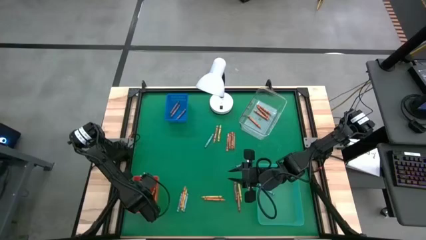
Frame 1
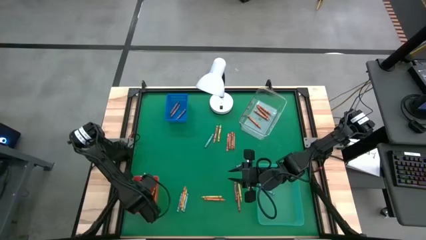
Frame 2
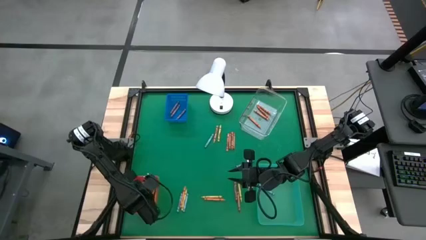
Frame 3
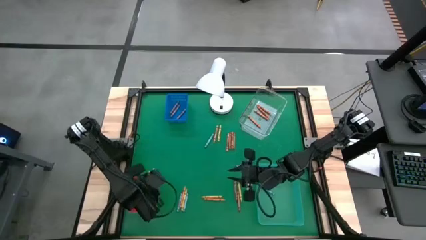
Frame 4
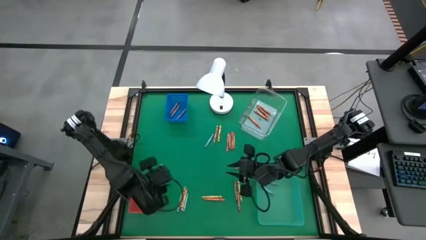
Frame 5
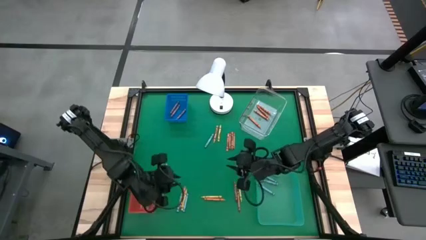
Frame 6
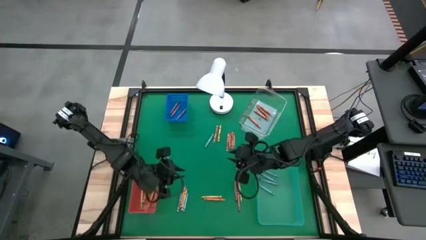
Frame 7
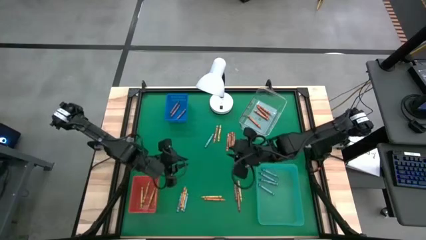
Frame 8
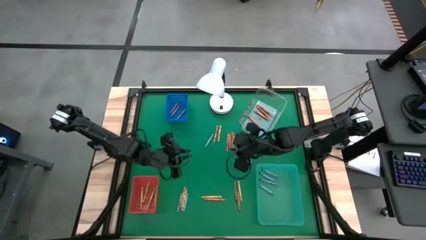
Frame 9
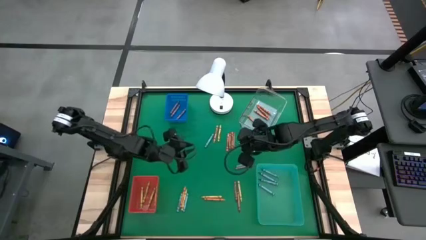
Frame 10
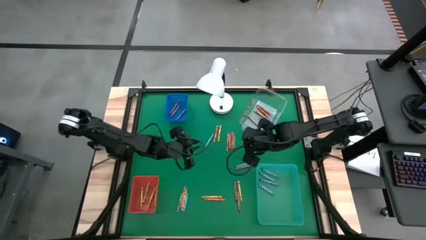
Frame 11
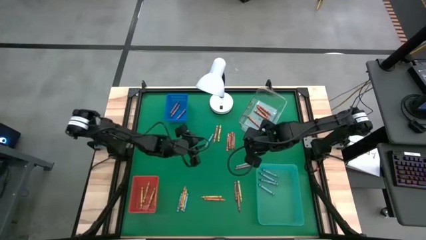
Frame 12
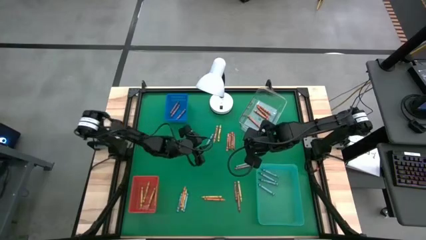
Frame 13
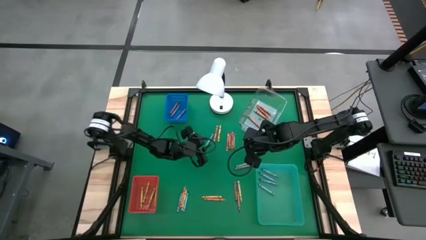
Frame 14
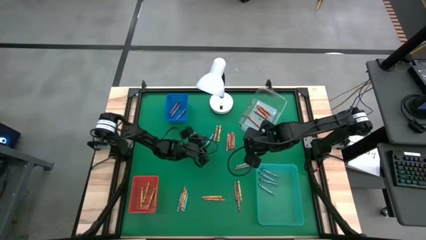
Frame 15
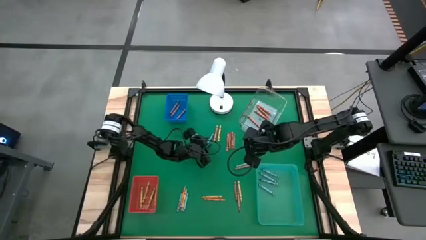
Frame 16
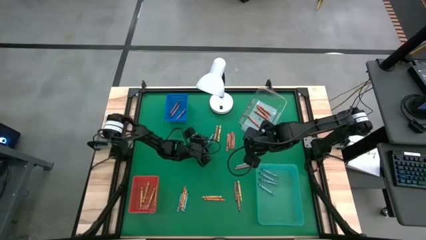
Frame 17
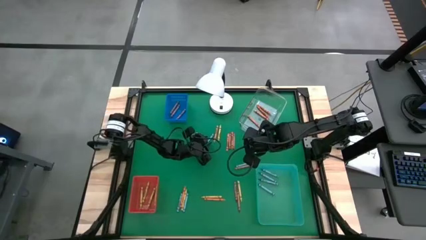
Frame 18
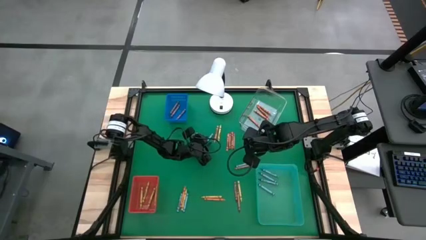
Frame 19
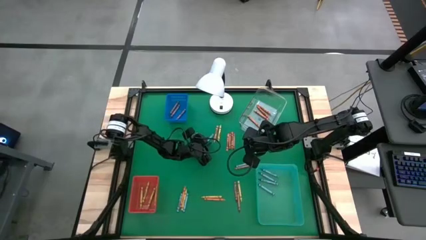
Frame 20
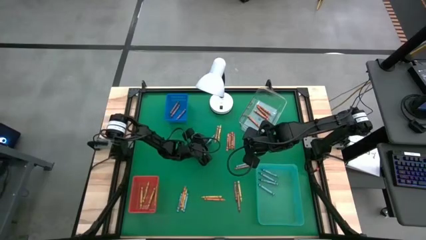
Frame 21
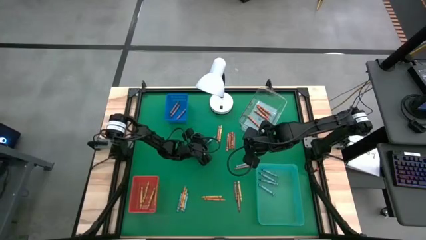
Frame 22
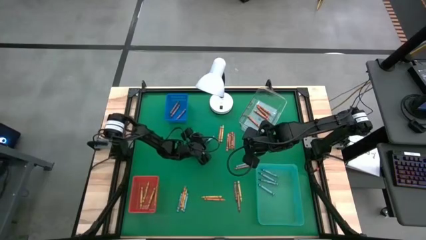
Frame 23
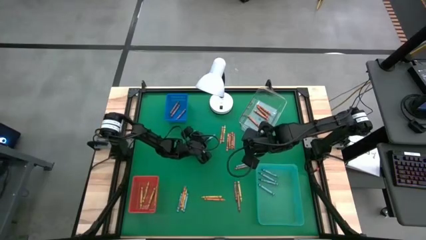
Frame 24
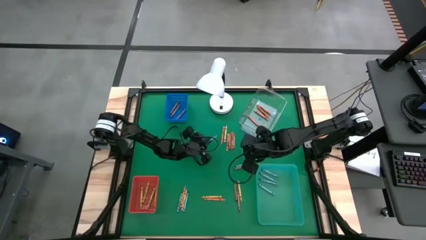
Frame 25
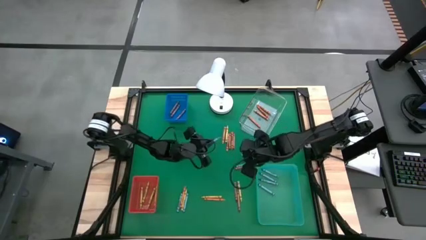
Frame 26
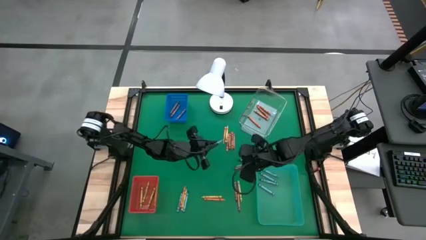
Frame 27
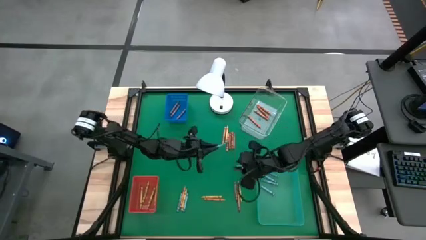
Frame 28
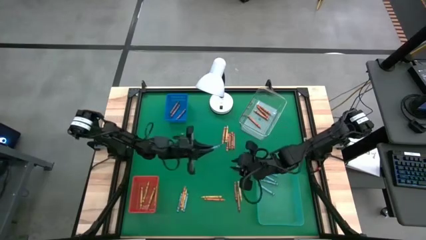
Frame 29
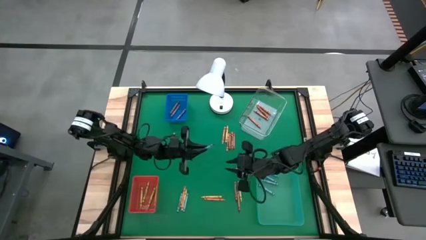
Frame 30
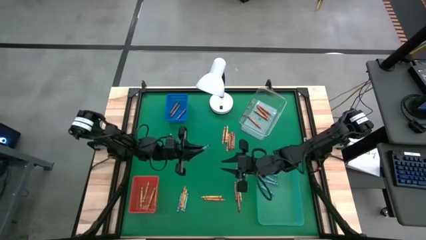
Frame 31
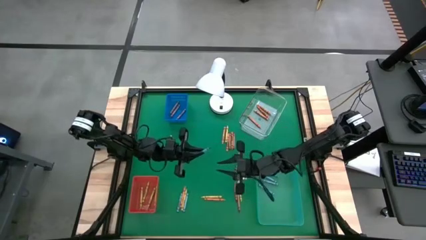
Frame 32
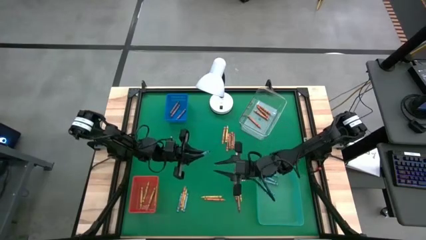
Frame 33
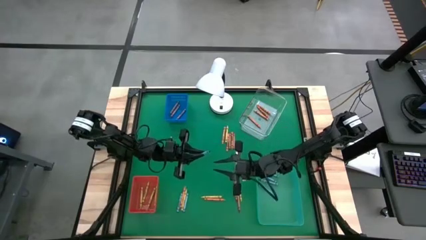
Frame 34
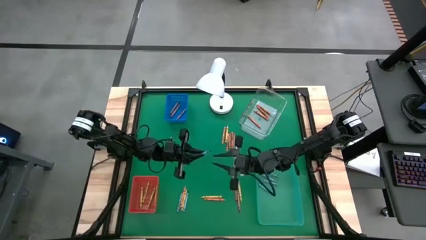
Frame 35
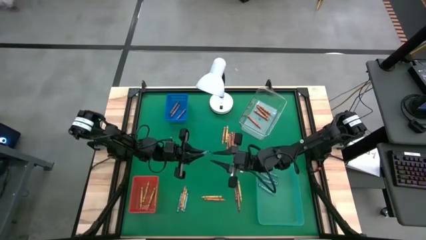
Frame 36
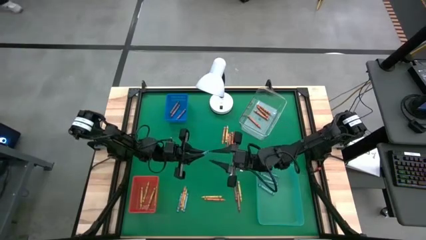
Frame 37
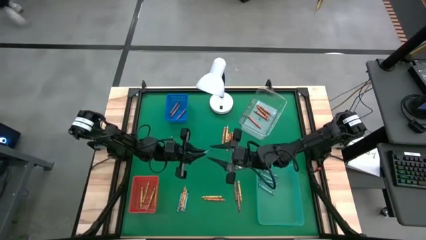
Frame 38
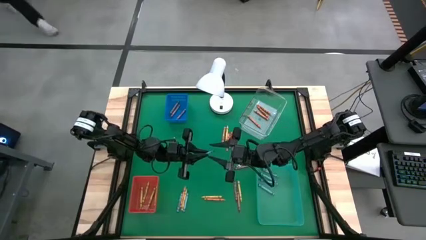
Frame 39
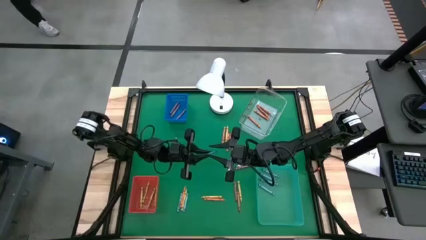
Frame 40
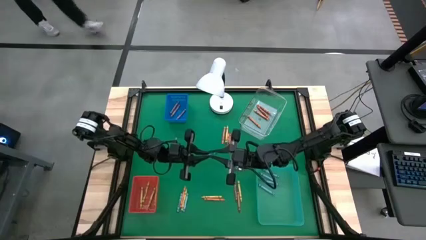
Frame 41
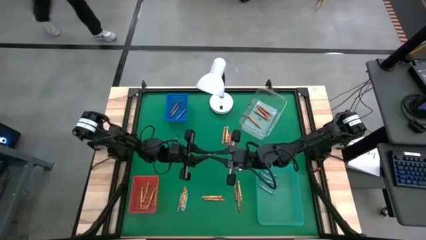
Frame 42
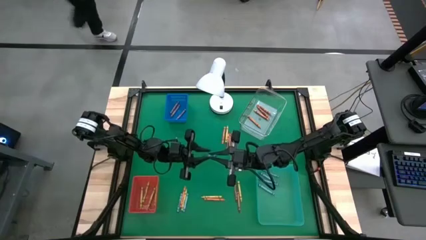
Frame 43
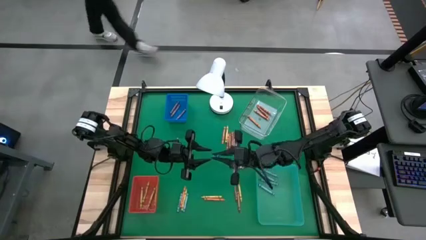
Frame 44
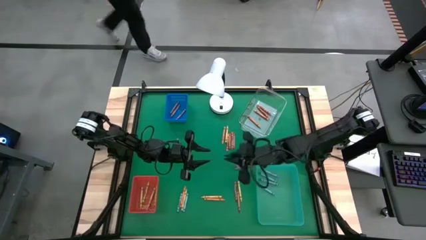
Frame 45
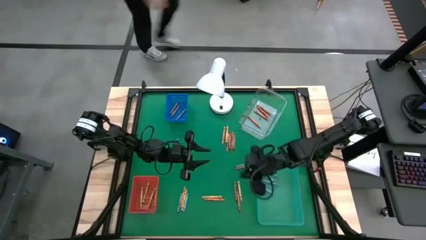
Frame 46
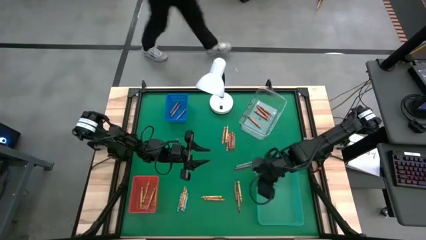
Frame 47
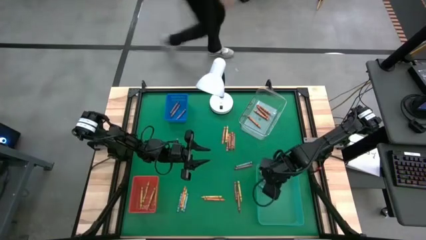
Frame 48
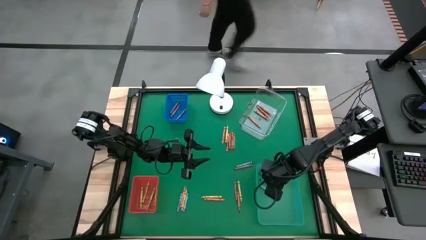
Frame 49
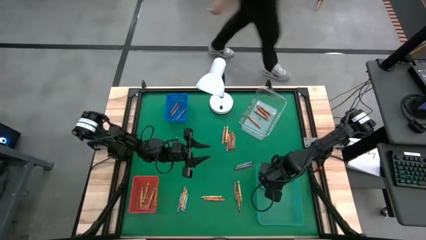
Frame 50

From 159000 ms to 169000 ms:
Task: Sort crayons
Put the blue crayon into the green bin

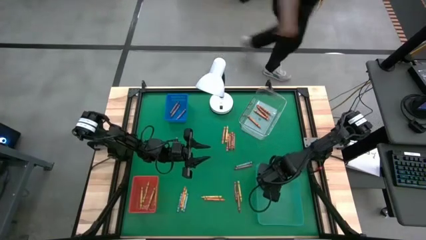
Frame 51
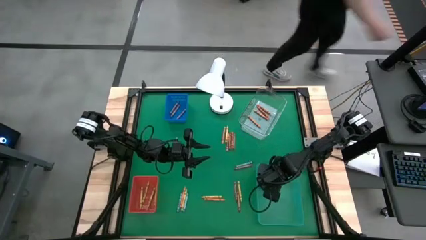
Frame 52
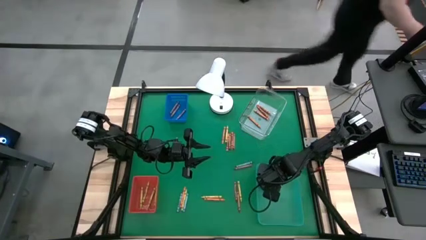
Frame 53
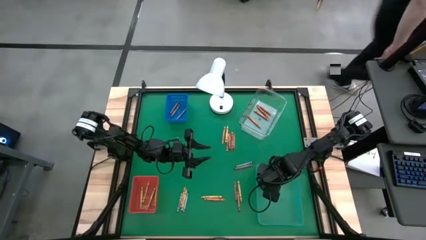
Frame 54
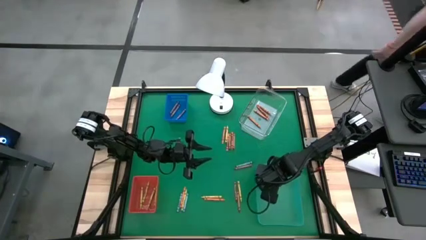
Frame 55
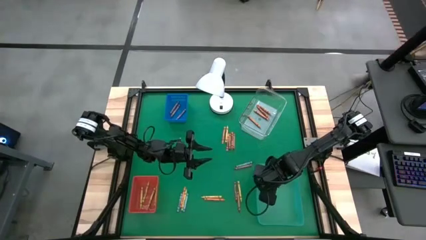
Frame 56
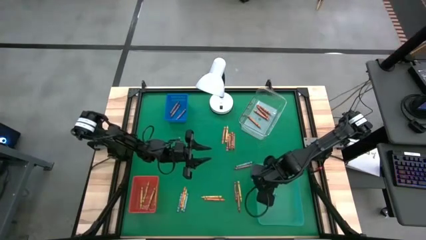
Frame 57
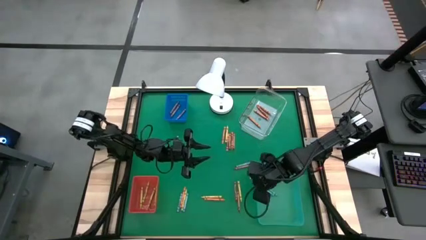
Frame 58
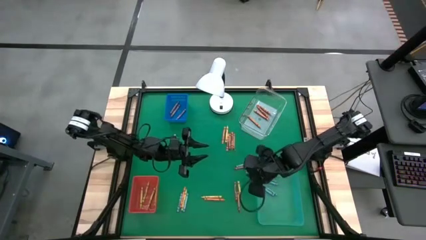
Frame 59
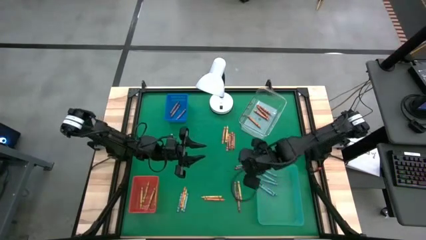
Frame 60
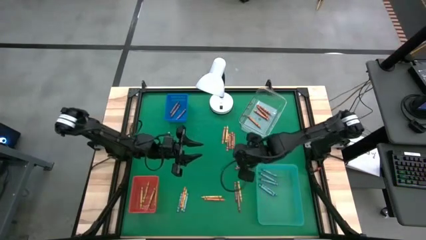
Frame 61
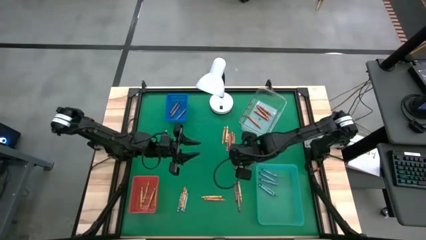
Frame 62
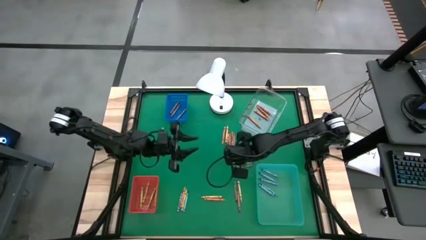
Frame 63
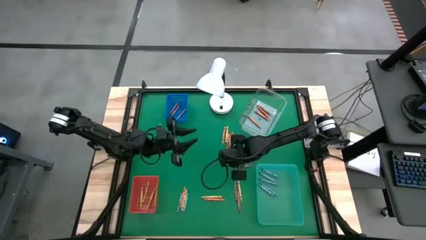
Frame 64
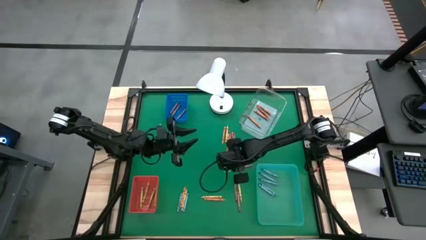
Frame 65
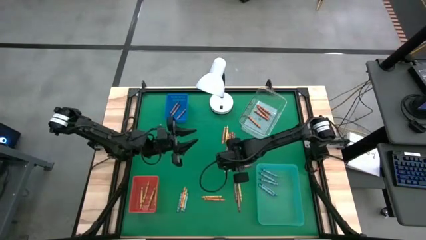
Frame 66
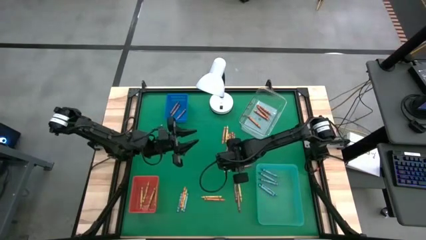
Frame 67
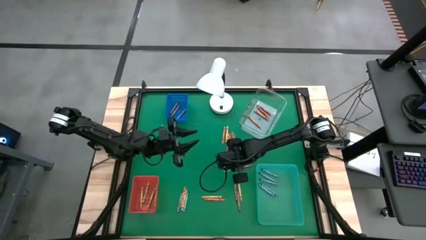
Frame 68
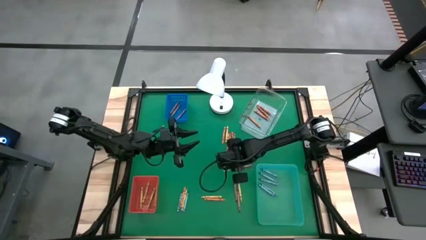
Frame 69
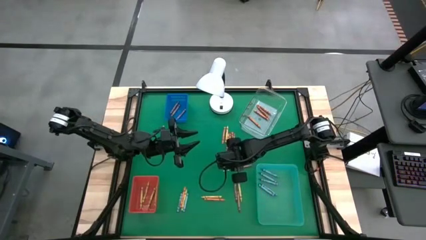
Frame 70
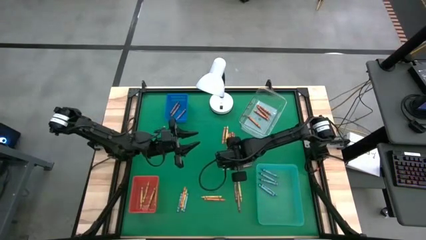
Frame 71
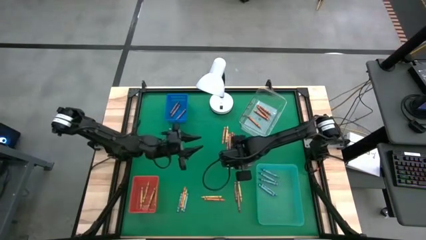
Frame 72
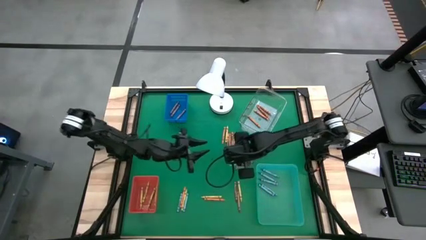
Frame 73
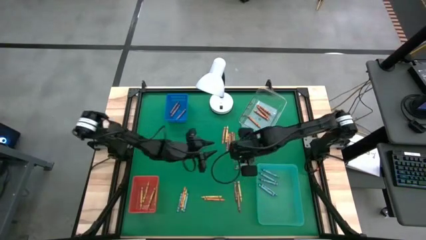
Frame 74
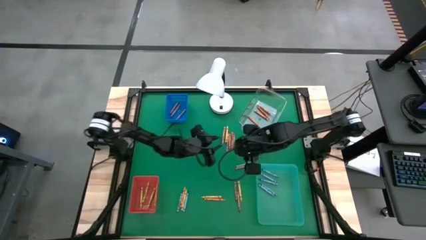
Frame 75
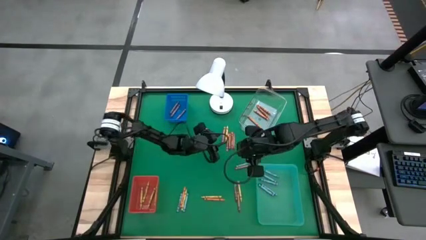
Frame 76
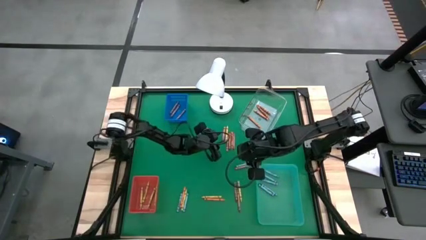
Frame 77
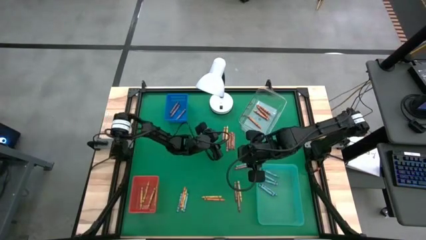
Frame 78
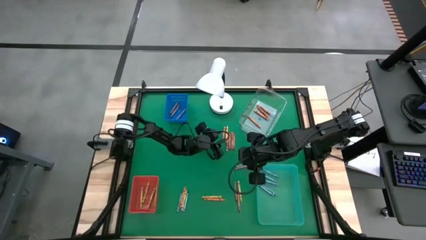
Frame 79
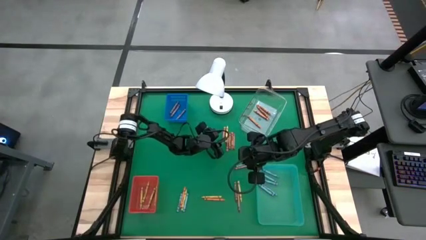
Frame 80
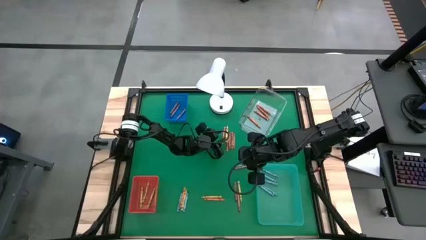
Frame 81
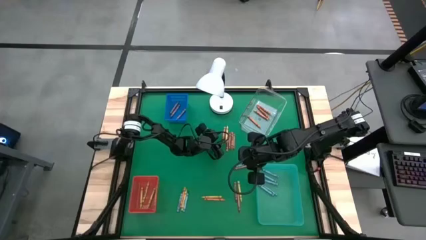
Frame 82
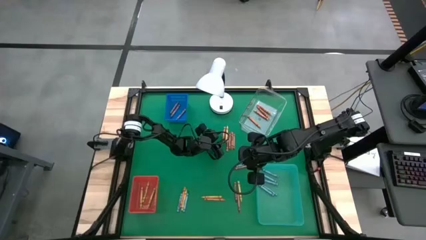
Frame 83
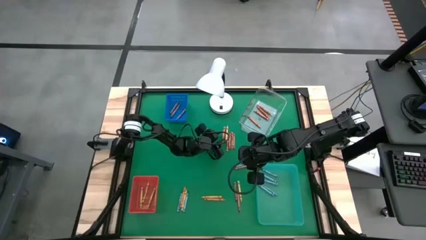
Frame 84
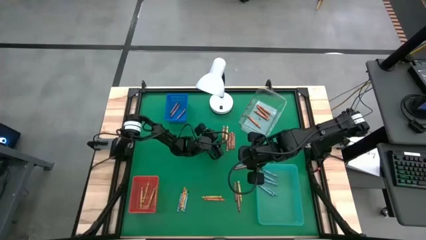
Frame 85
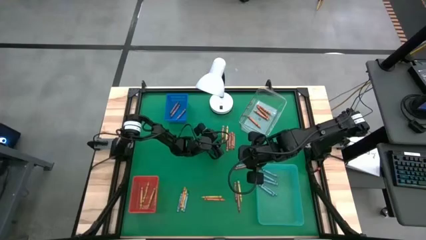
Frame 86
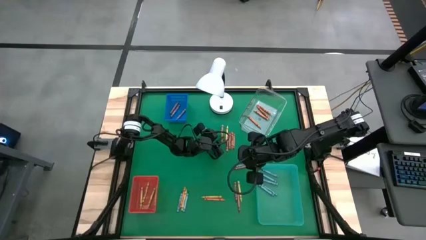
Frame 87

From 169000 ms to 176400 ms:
Put the orange crayon into the transparent bin
